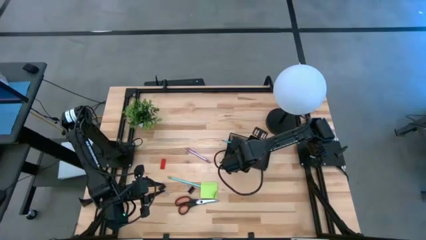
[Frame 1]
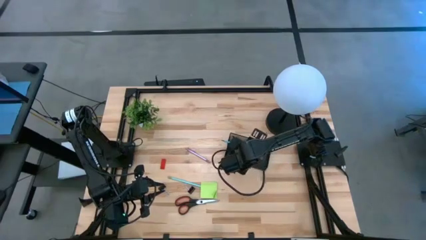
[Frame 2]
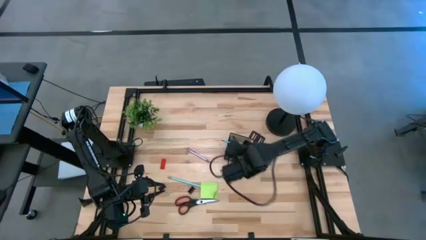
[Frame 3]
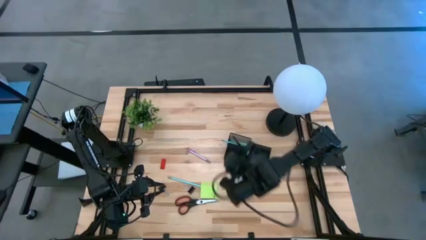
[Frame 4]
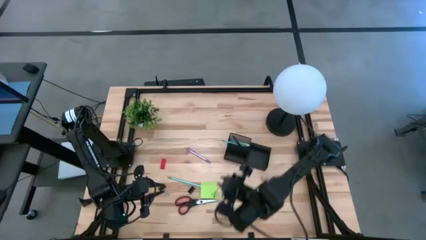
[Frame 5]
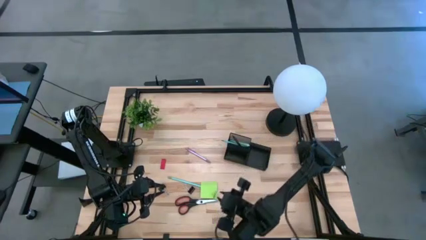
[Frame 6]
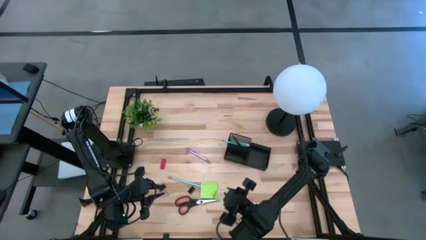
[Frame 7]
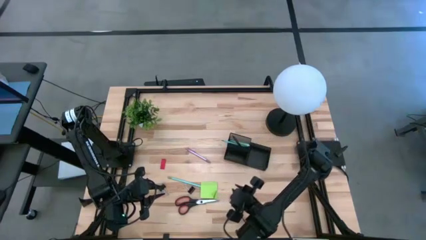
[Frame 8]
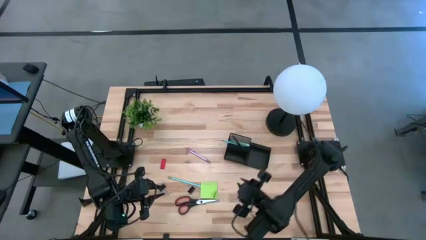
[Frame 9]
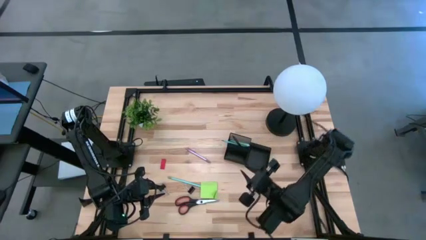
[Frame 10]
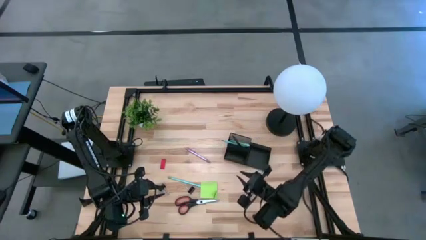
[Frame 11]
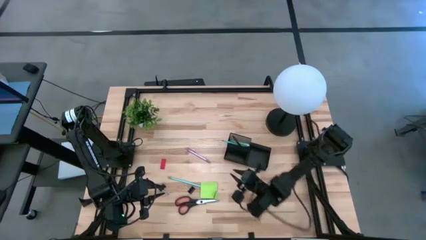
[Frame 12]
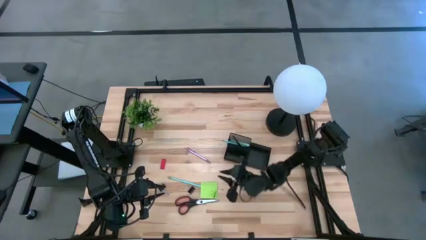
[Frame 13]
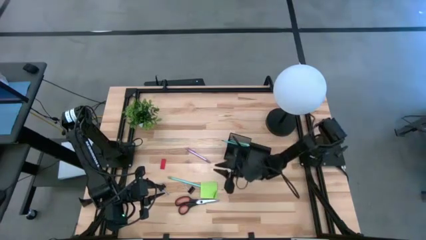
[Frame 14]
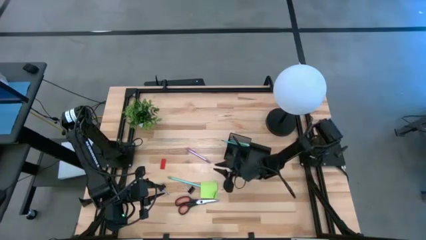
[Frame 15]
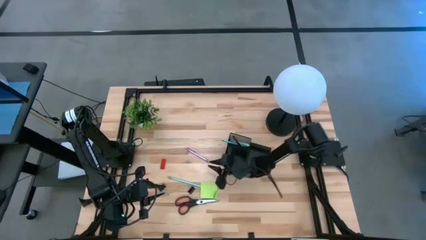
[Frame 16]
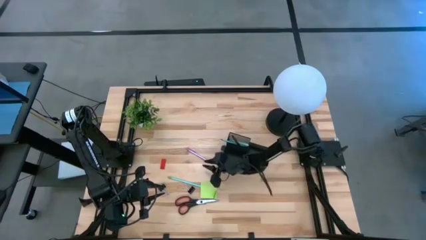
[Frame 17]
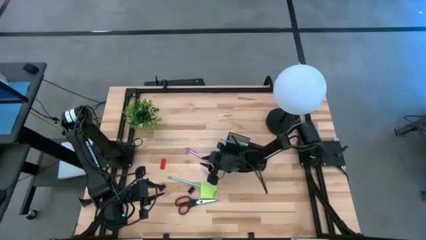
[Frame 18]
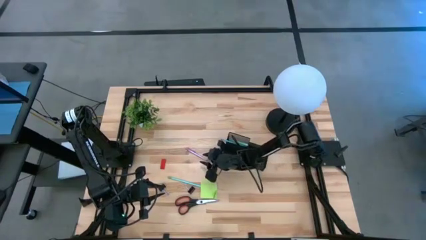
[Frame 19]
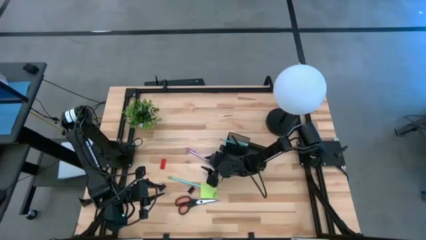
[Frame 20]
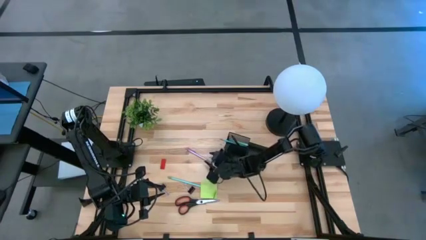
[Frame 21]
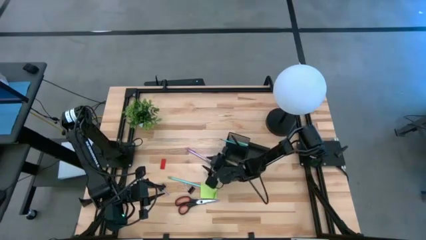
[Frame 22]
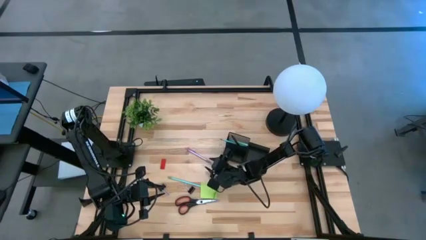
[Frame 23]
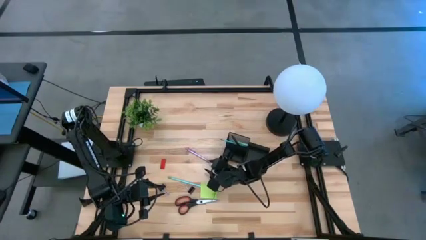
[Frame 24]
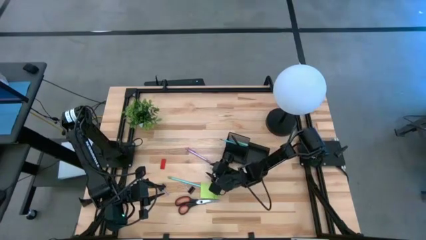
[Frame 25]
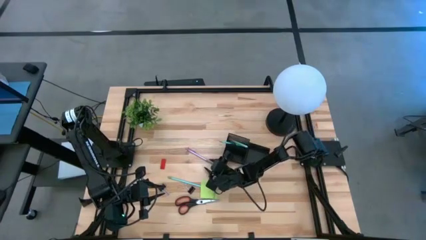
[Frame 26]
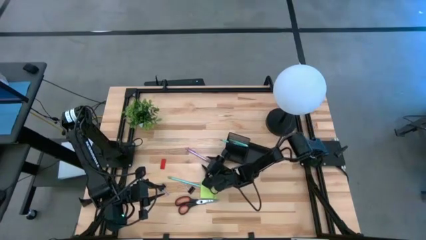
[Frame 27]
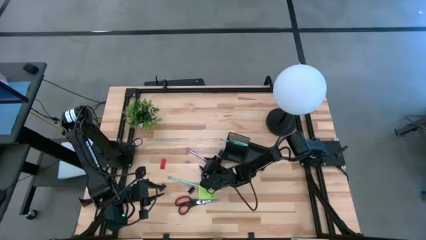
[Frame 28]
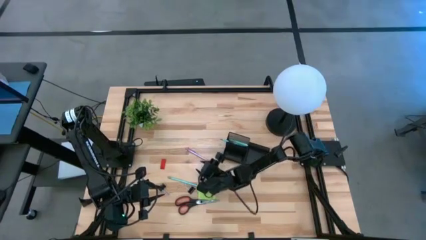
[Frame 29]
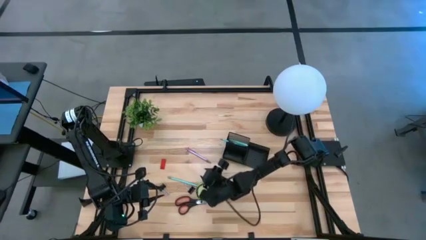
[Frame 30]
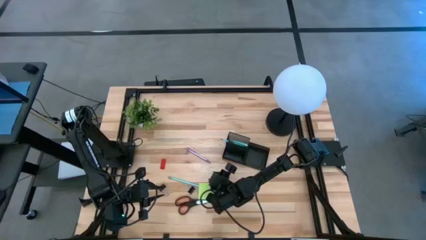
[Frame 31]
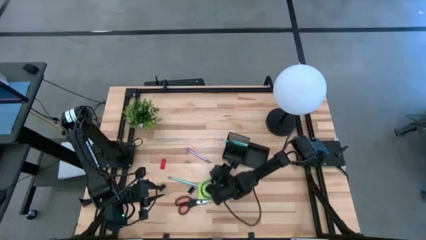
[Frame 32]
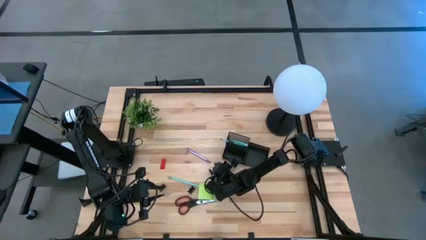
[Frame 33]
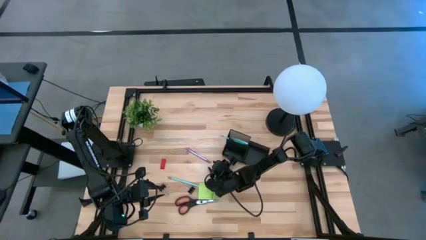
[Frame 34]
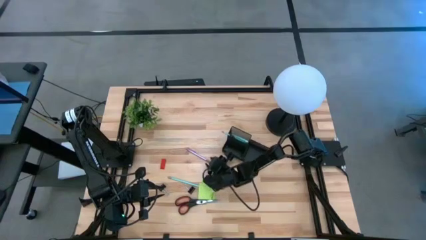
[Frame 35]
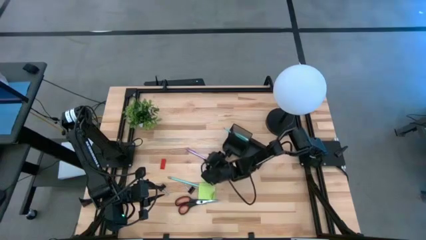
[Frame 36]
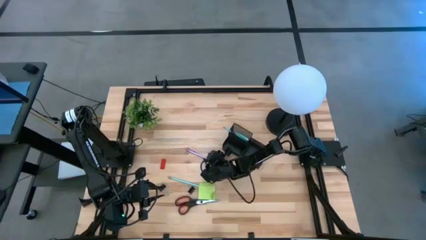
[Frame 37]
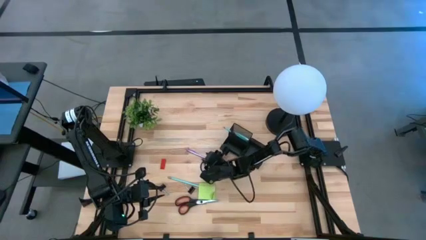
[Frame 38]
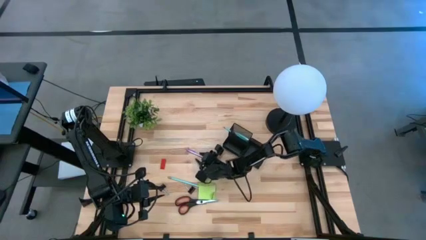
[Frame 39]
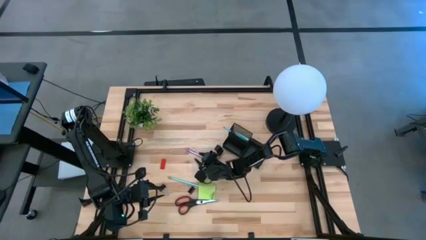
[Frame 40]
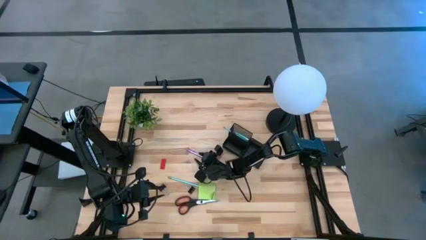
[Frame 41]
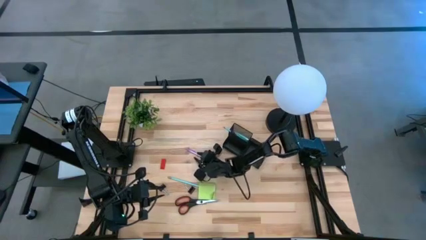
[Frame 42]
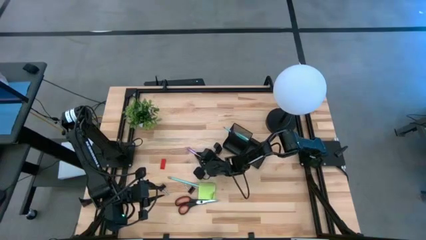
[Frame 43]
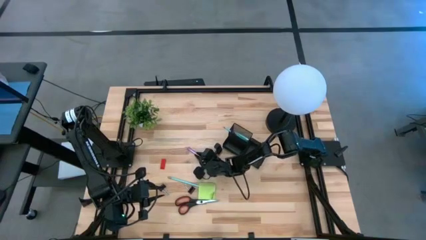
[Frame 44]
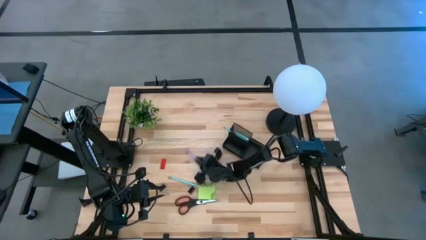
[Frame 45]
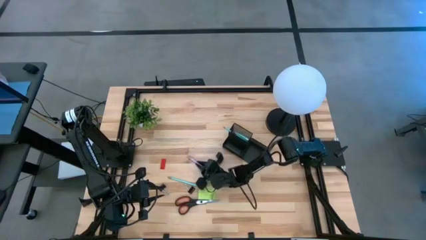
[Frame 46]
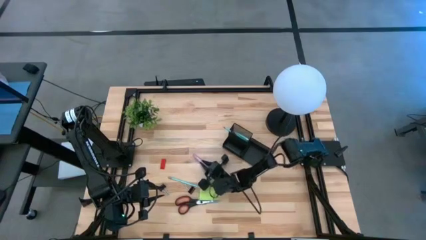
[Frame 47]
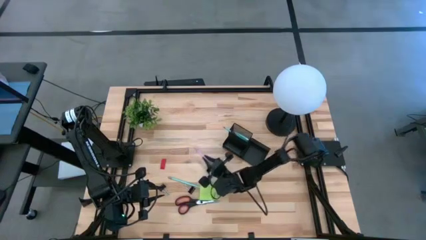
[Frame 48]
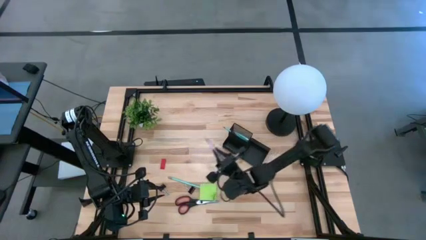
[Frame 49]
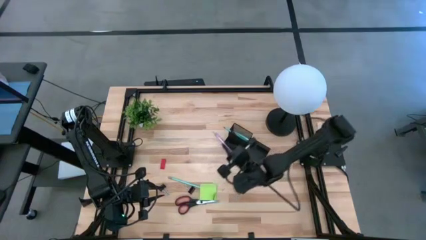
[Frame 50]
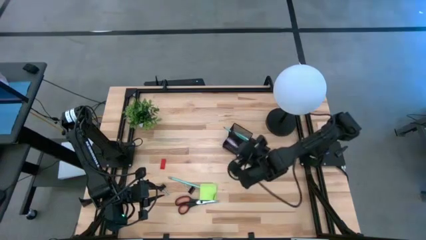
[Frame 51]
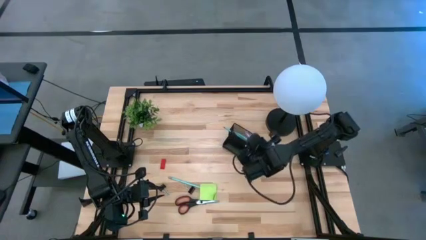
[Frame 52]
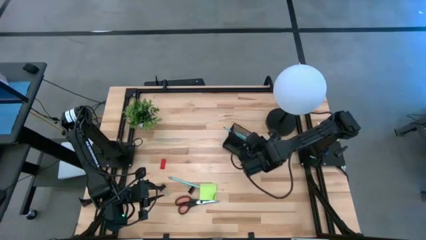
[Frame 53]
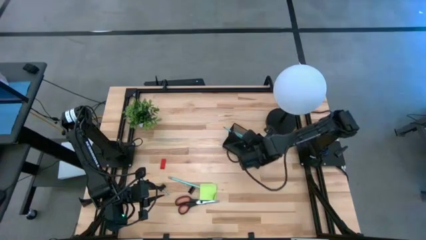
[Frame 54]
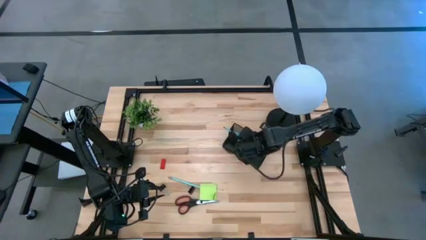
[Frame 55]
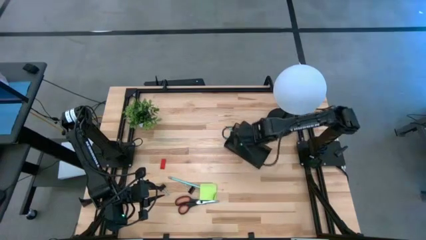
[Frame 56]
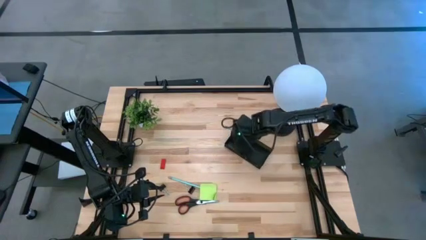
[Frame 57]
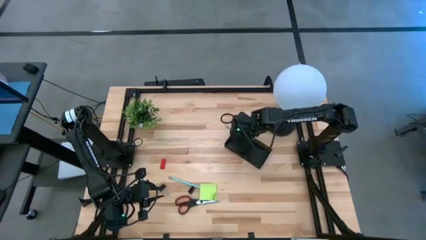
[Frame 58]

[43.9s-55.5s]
Task: Pick and place office supplies into organizer
Put the purple pen into the desk organizer

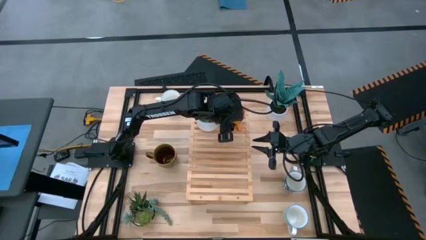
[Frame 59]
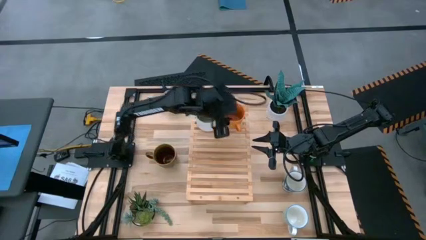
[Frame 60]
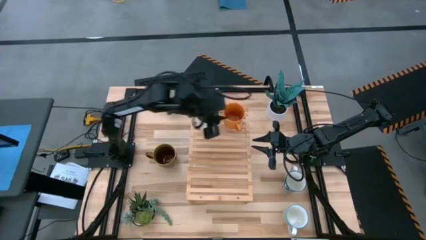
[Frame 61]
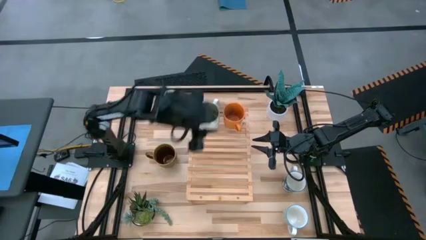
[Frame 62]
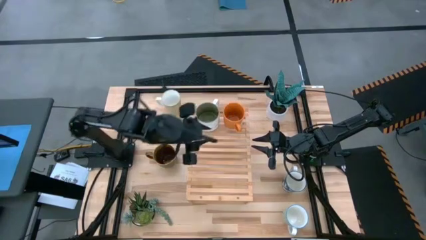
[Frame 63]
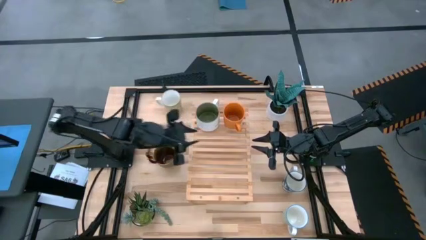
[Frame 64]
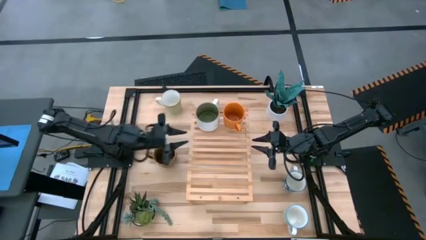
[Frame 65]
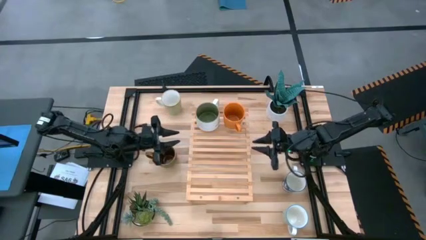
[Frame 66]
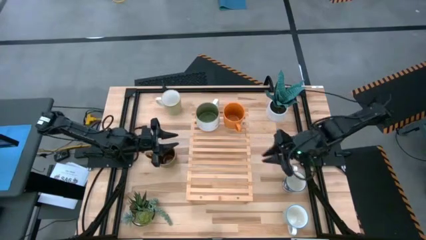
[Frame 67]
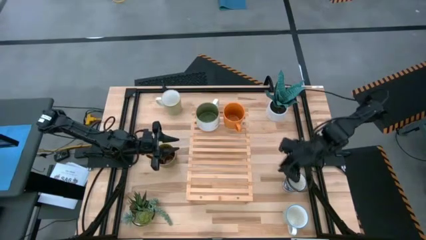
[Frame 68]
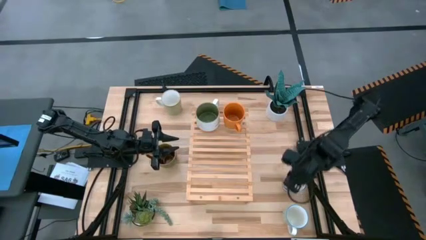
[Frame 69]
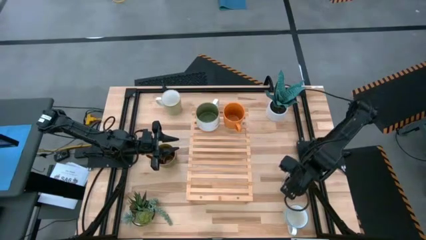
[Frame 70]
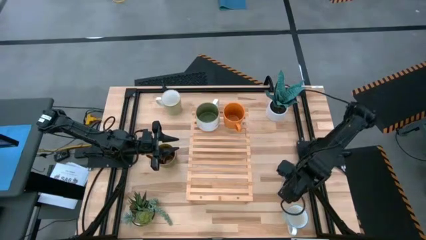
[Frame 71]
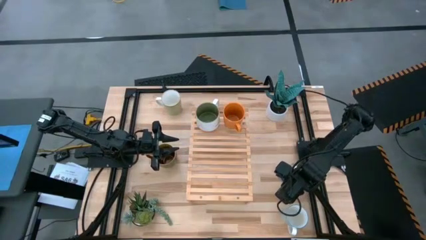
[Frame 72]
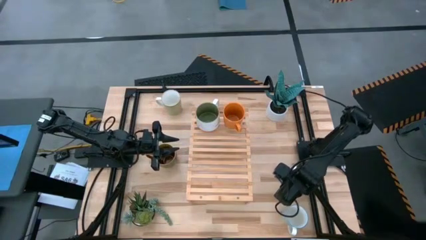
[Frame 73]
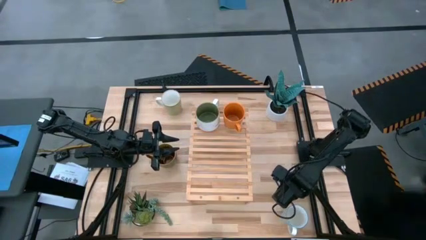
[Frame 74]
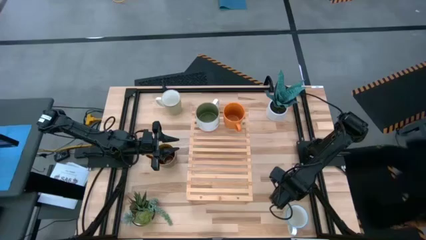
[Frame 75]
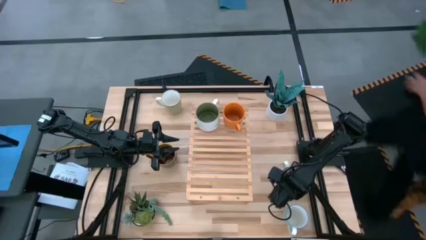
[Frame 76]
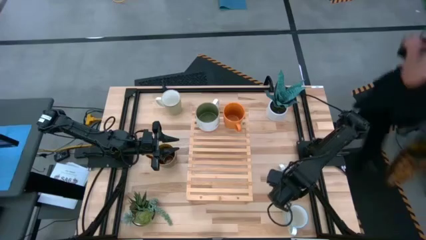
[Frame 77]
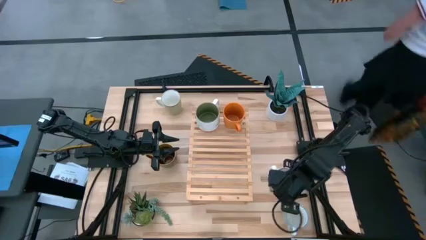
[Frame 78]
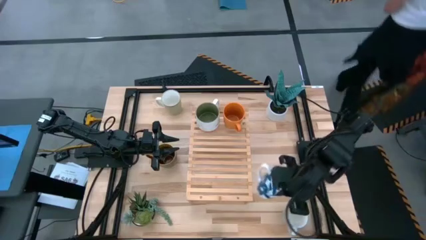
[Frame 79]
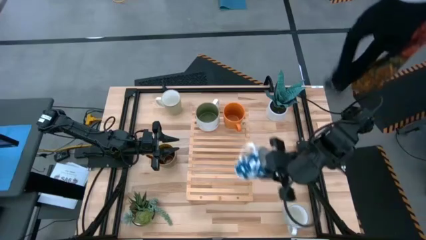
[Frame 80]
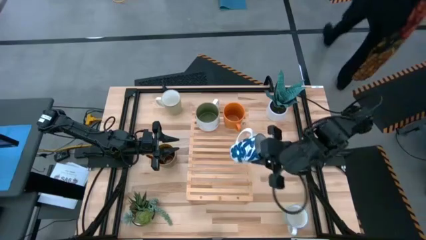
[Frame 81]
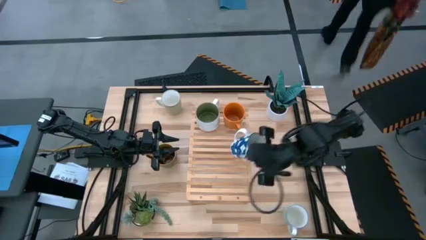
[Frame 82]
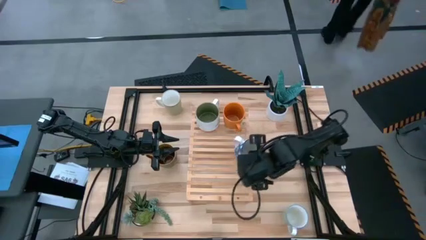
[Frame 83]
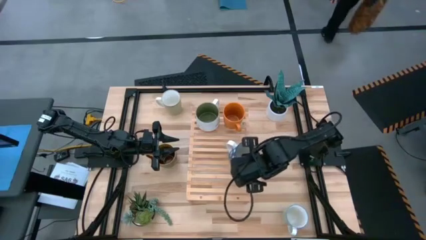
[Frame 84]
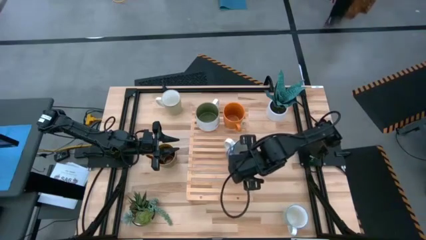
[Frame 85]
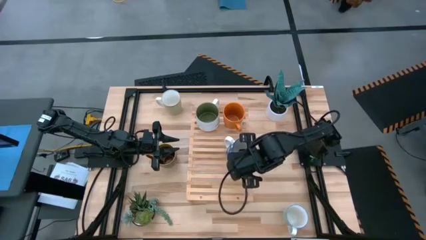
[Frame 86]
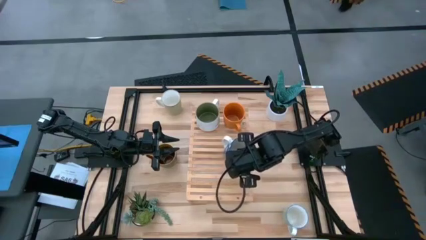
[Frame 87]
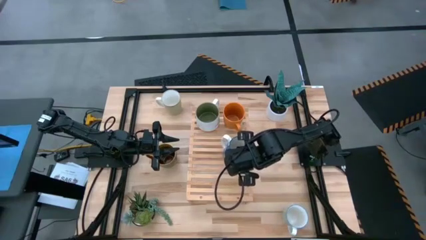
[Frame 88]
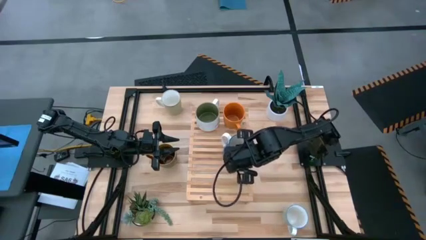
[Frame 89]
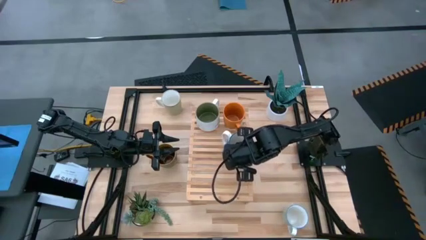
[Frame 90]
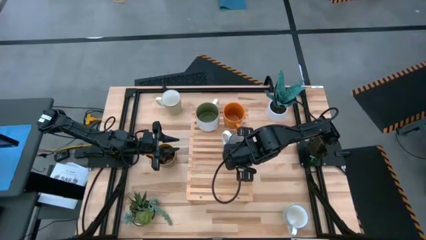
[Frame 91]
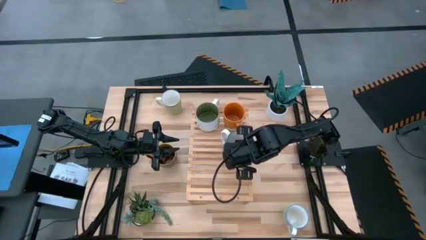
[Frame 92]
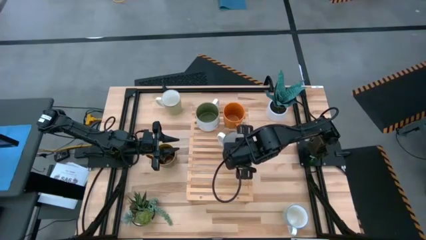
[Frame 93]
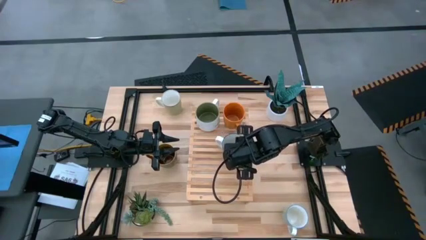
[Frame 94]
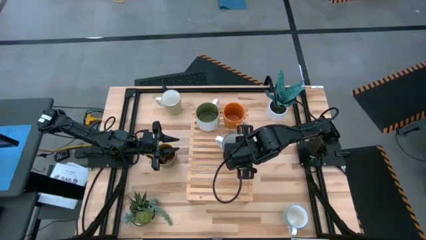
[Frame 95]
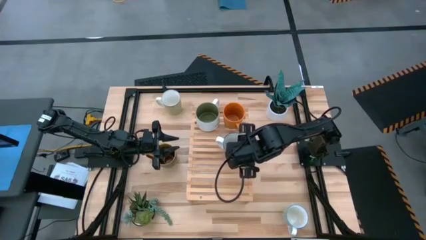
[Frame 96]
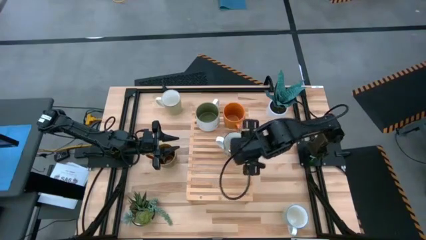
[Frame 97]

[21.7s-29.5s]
Task: Place coffee mugs
Put the dark blue mug on the shelf
